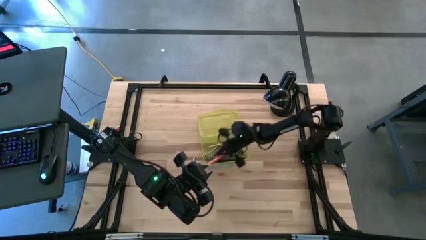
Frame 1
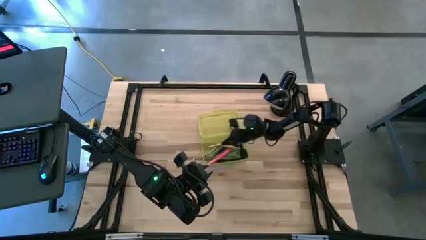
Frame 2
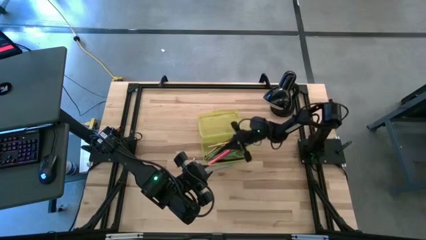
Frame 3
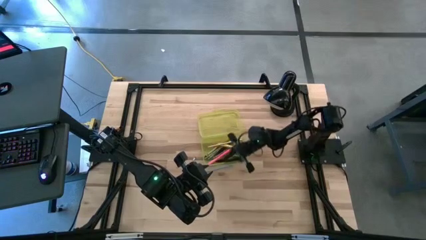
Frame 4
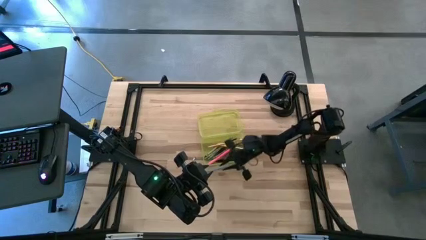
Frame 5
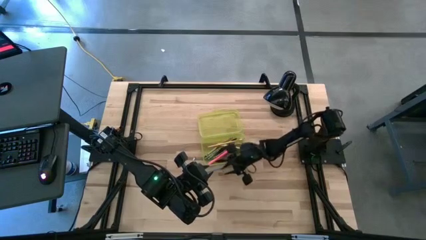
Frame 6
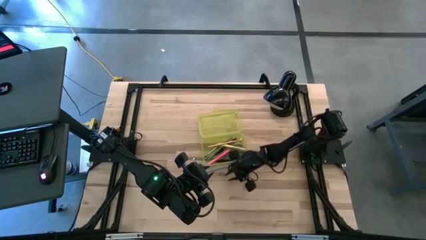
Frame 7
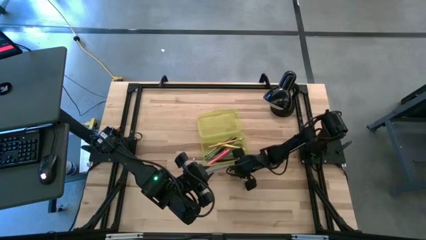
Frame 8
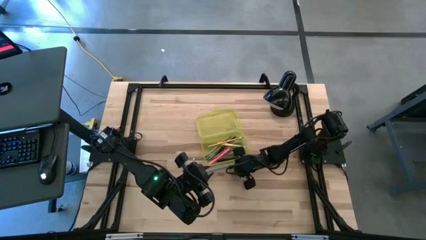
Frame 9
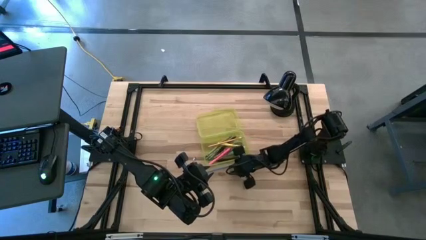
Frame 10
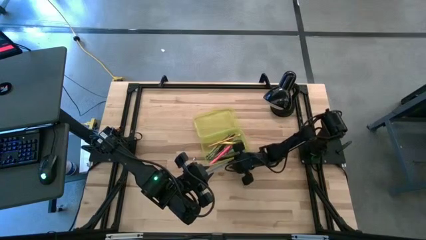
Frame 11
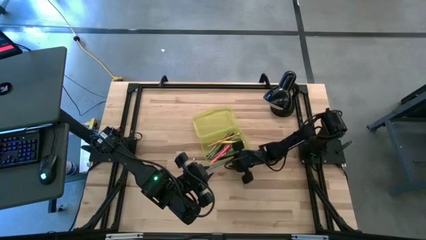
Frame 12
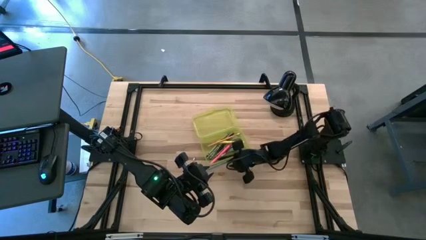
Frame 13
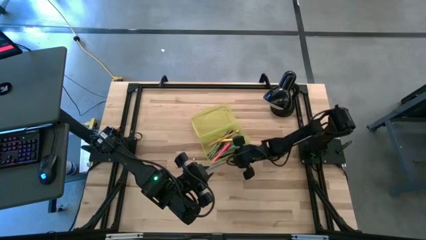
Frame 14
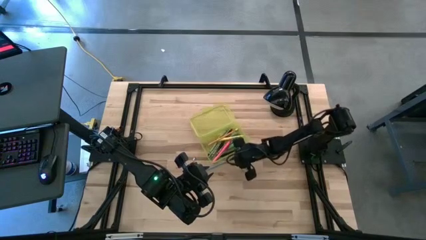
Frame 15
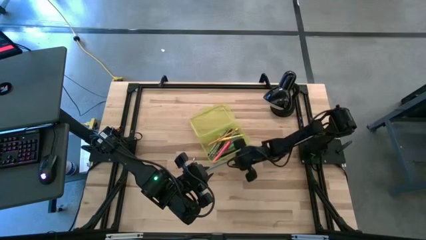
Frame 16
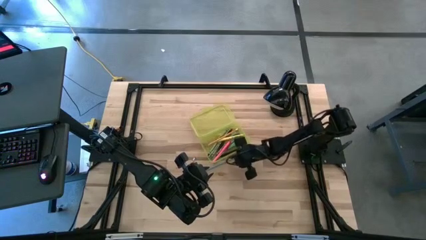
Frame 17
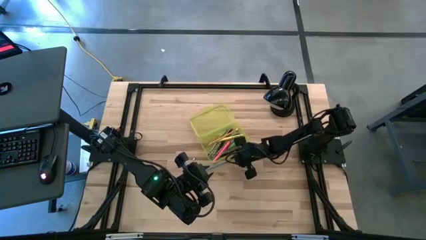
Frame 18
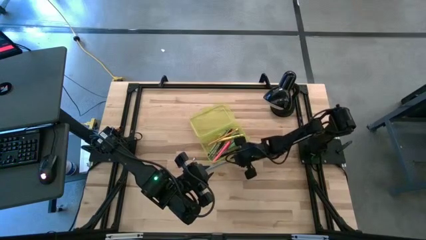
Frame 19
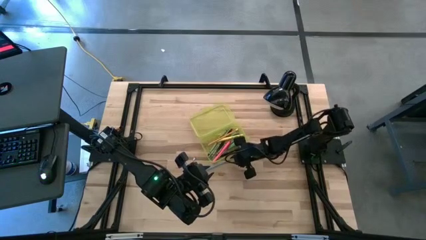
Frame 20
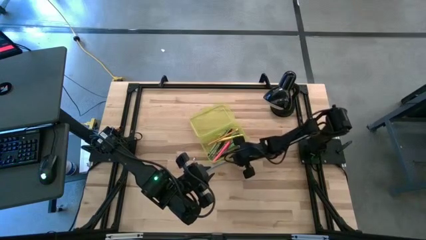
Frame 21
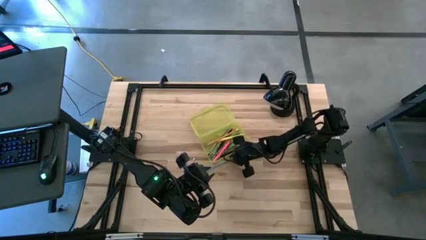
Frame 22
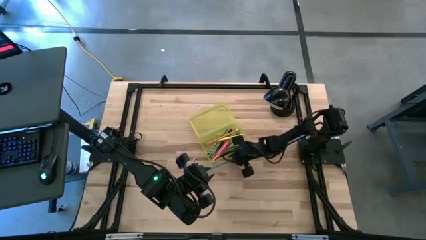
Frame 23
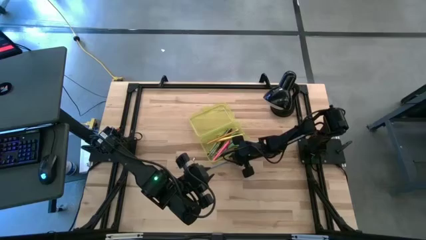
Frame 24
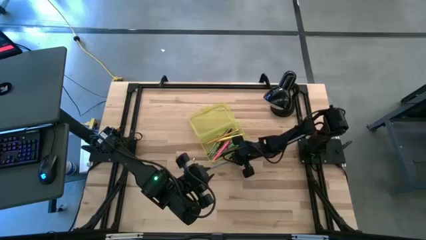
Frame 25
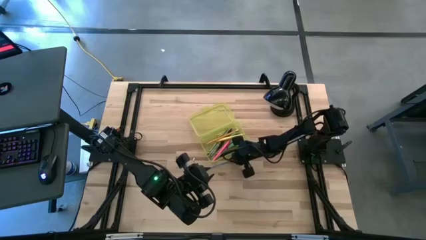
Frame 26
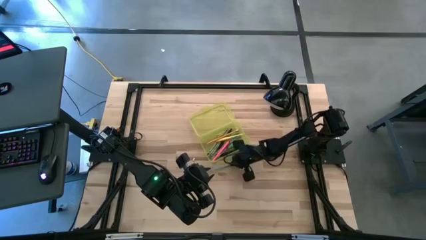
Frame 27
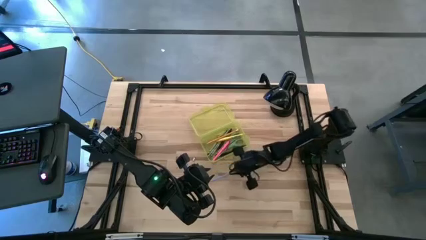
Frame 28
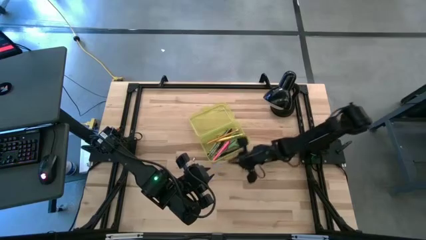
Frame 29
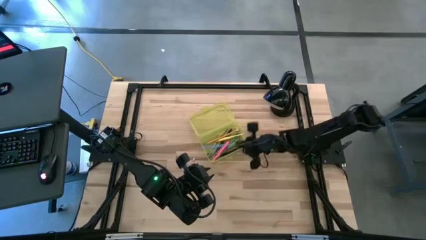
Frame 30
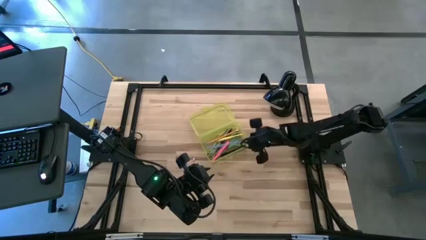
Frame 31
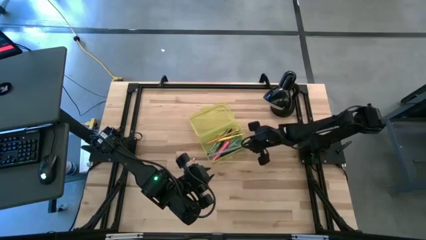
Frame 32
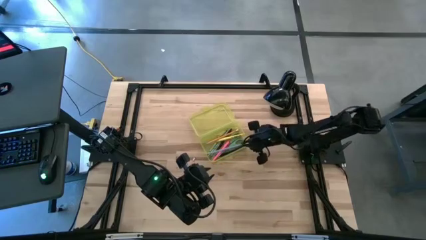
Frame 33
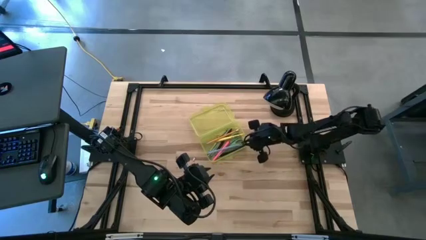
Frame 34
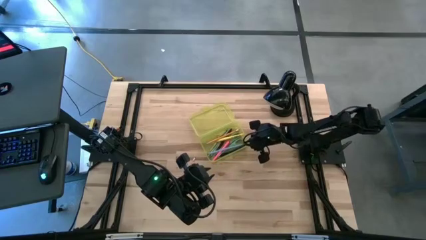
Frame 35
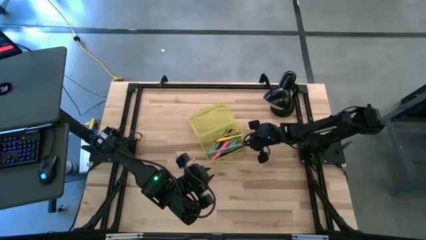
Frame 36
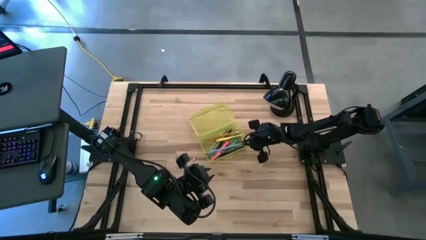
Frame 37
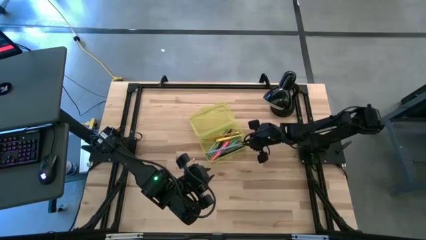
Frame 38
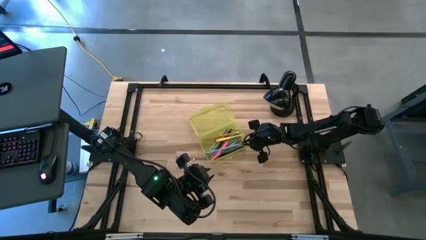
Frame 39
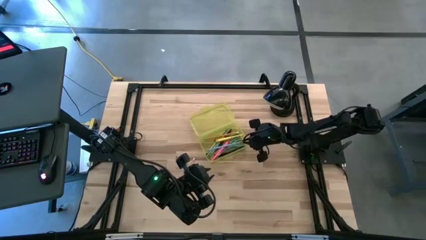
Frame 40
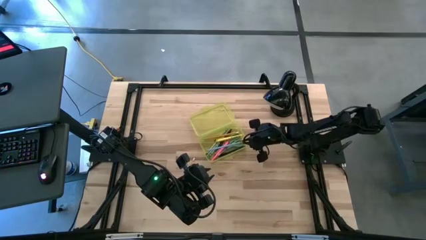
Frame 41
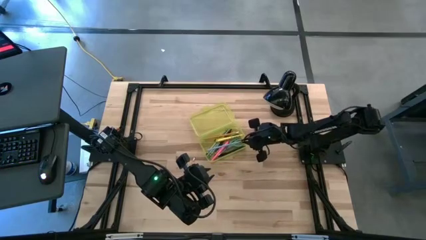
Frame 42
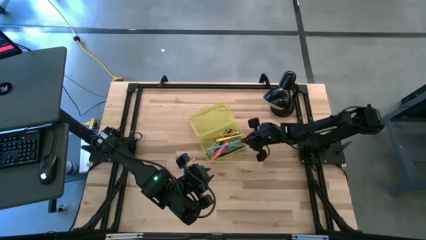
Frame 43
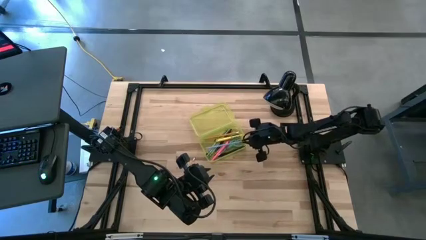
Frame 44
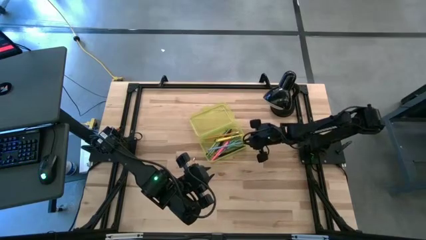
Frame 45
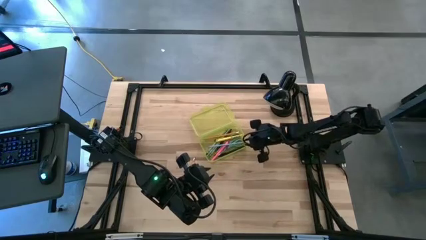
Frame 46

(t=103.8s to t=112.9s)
Task: Pick & place school supplies into a supply box
Put the blue pencil into the yellow supply box

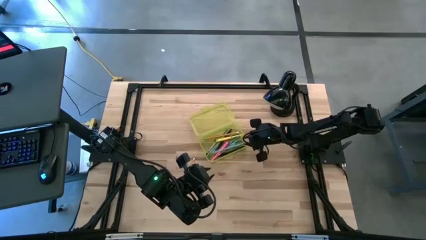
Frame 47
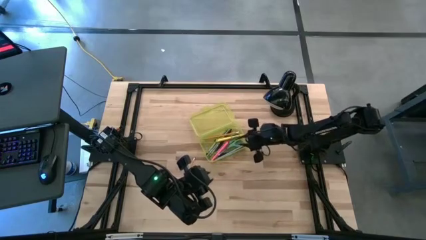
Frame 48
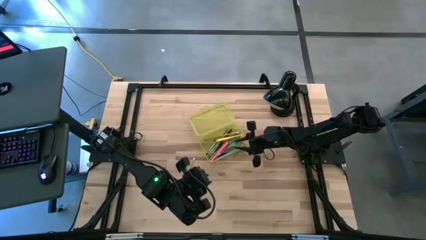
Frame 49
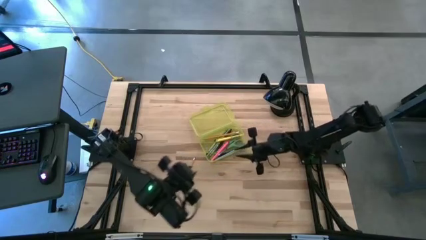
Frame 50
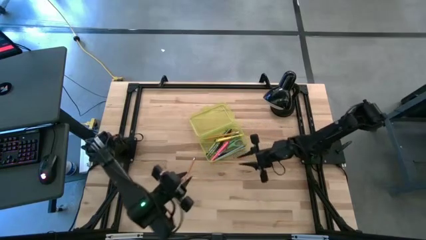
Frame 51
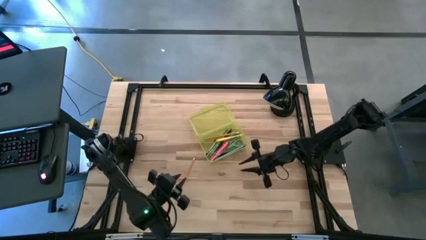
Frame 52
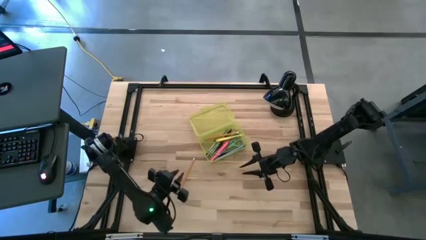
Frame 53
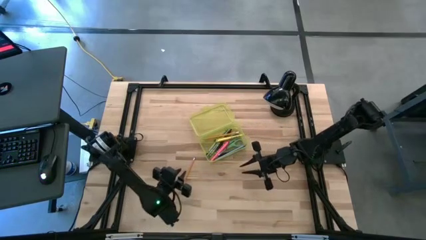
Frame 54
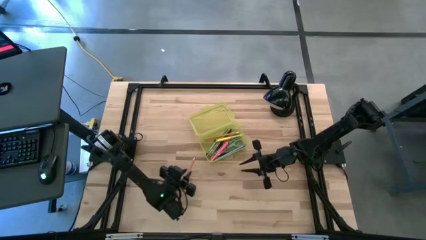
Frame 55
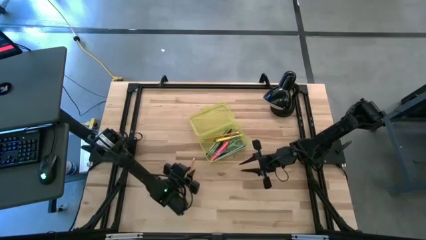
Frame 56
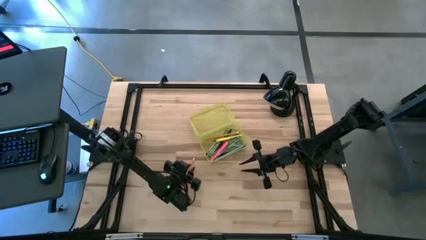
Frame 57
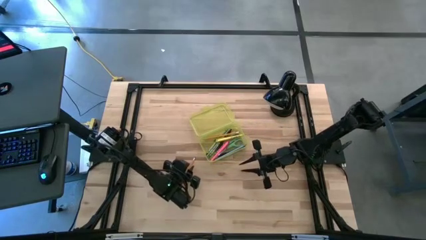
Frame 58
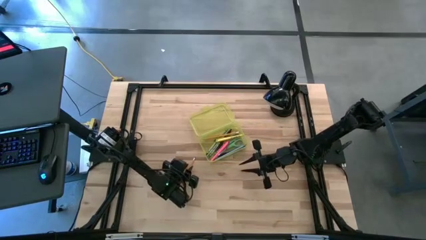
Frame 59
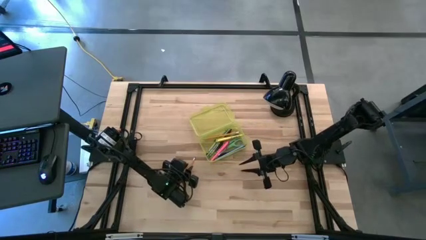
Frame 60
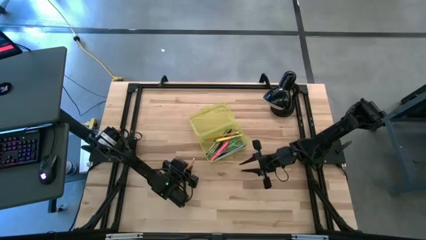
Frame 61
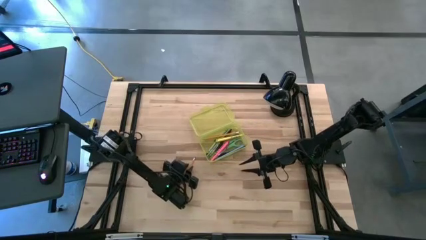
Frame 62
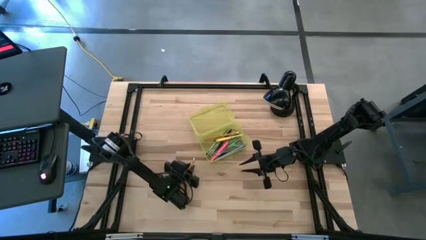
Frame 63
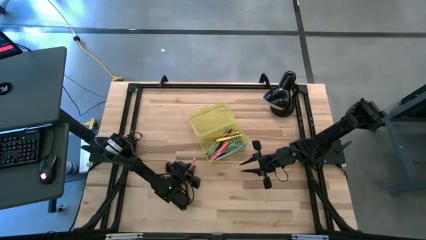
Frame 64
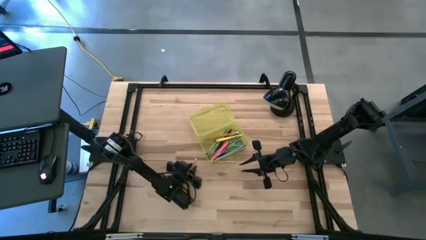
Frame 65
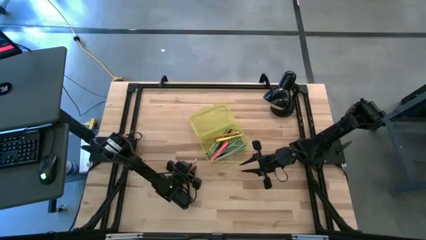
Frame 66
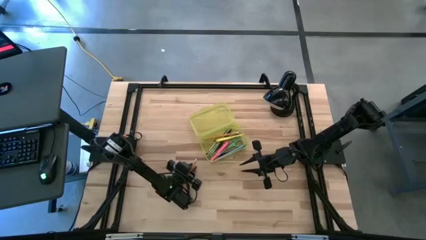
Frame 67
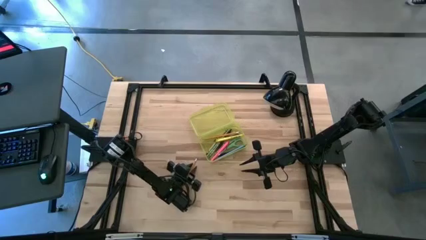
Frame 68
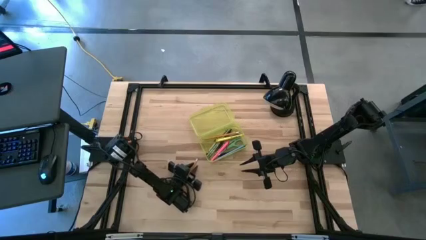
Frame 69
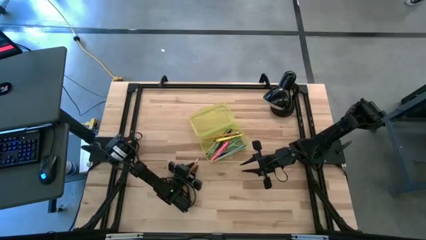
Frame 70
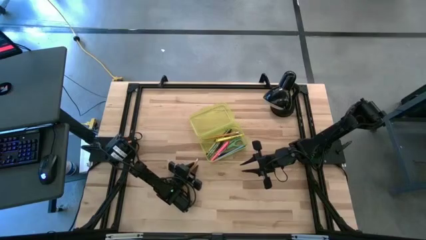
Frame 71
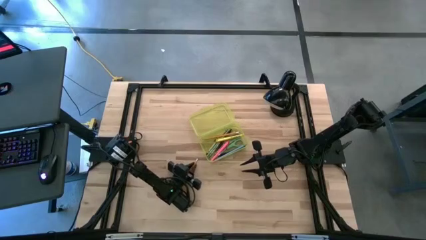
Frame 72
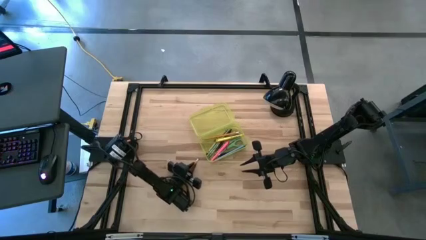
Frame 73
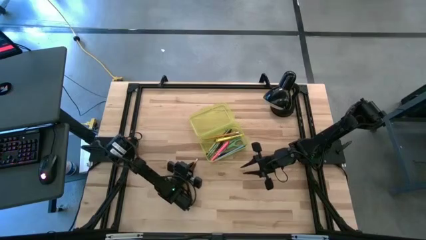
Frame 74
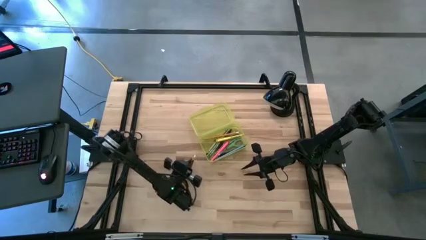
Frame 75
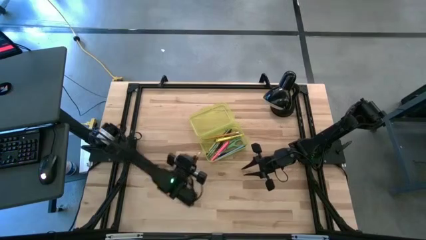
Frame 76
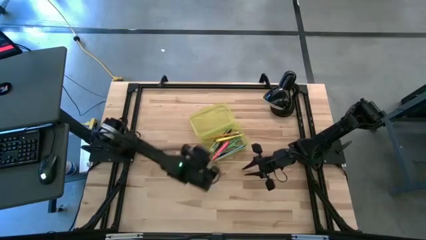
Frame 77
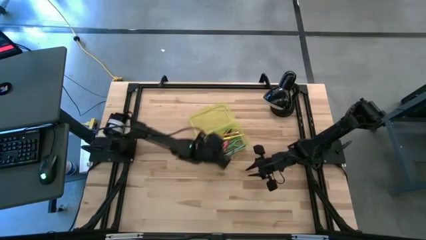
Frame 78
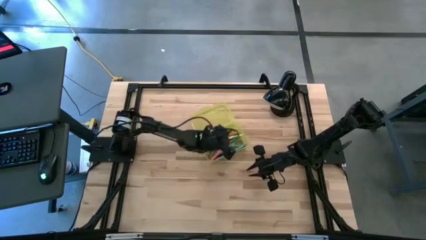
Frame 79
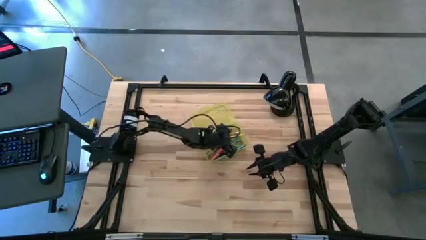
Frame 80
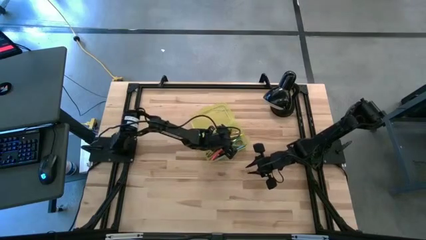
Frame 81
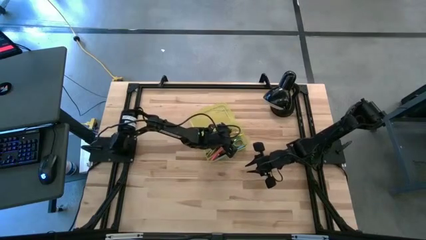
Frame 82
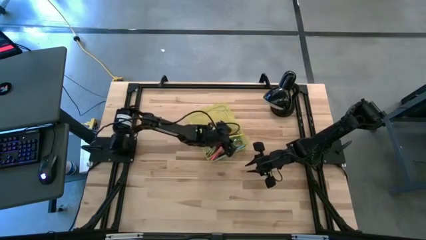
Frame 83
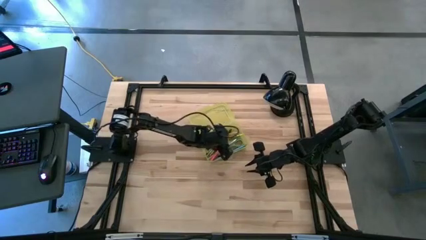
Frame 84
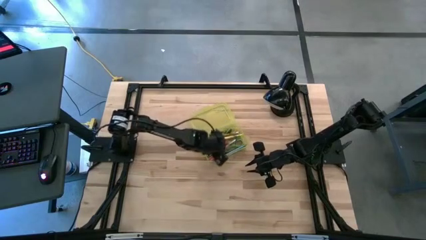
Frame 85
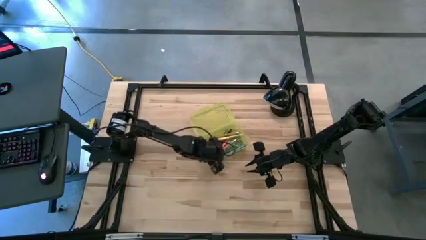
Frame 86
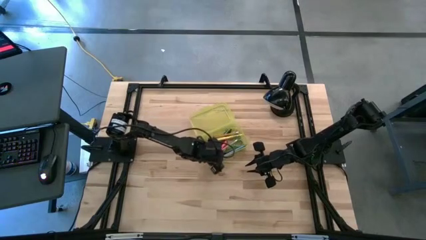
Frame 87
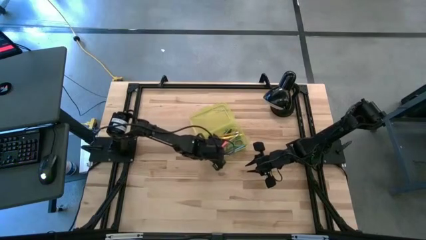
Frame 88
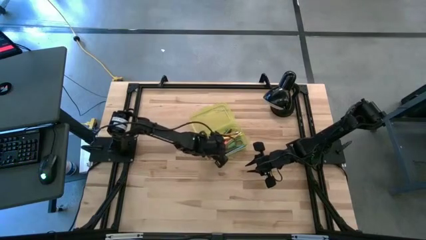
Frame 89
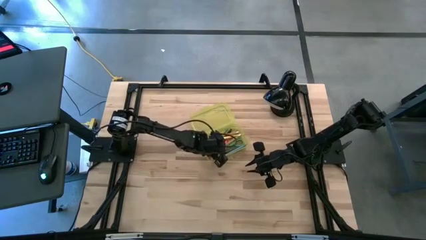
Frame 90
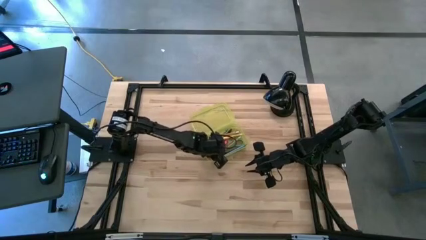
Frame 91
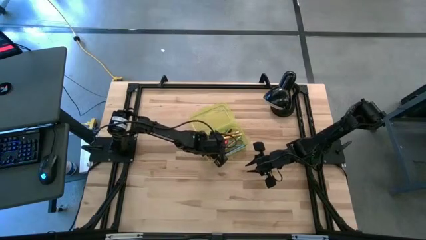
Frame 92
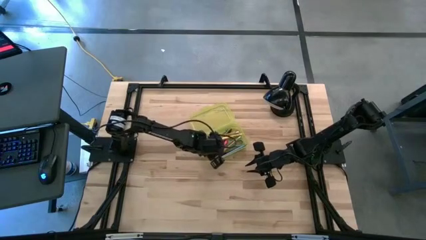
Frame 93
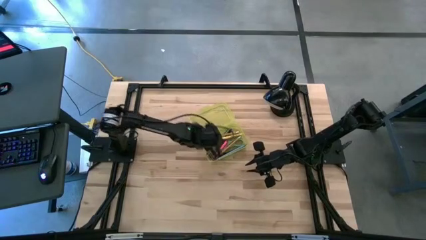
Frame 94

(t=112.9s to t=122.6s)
Put the orange pencil into the yellow supply box
